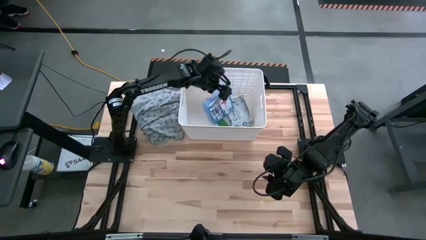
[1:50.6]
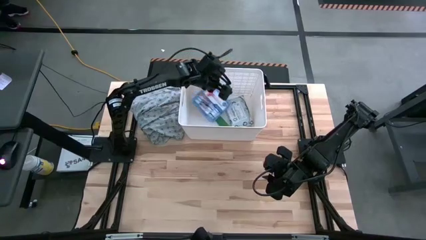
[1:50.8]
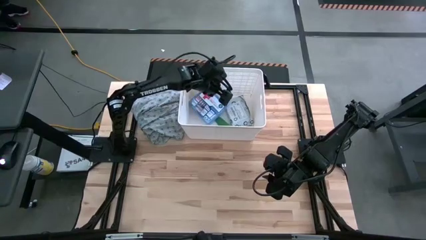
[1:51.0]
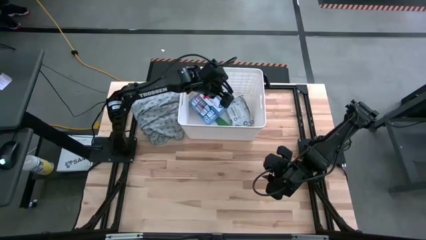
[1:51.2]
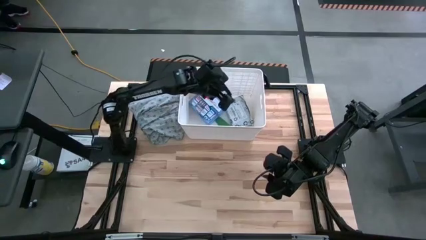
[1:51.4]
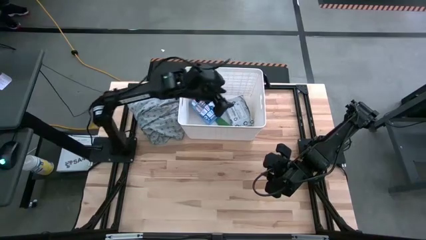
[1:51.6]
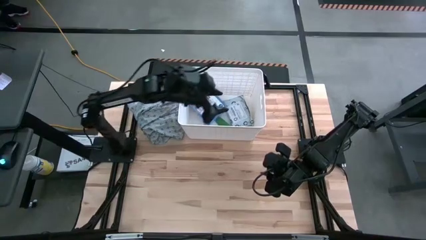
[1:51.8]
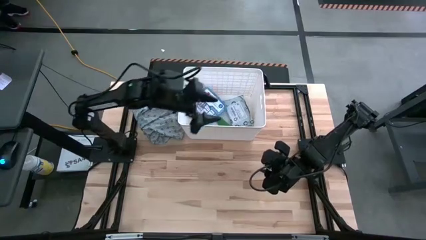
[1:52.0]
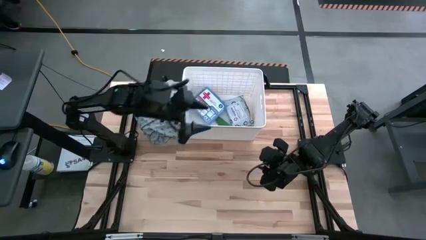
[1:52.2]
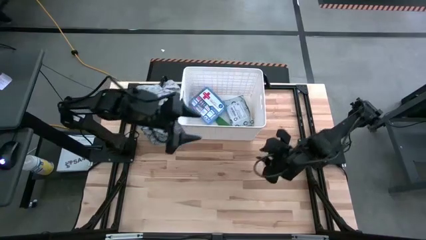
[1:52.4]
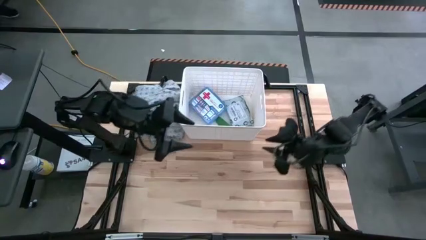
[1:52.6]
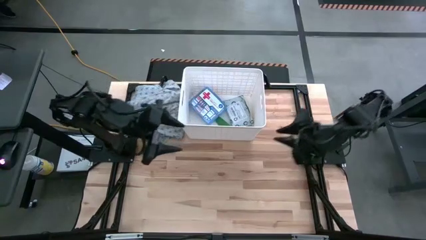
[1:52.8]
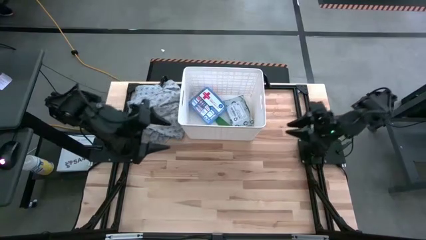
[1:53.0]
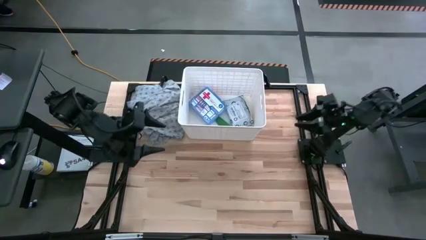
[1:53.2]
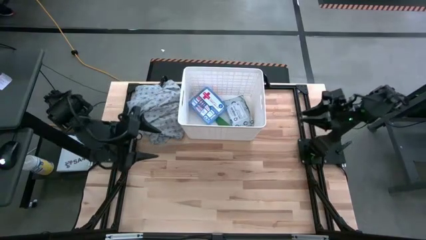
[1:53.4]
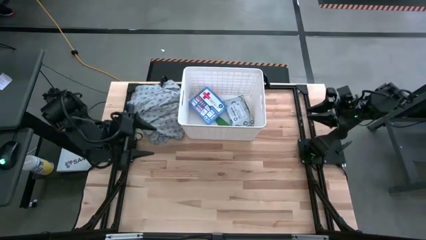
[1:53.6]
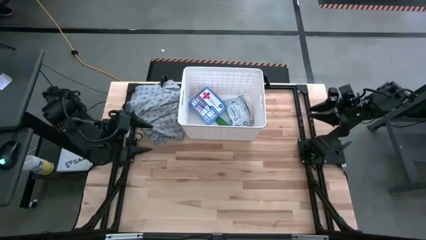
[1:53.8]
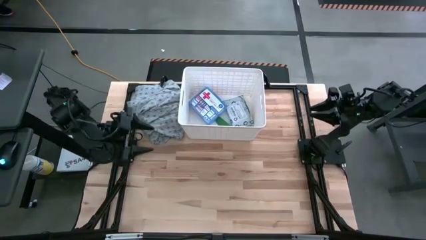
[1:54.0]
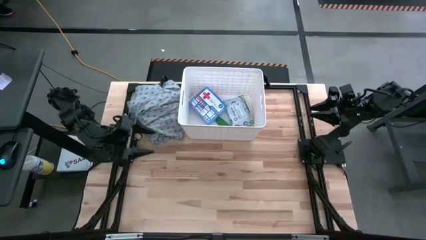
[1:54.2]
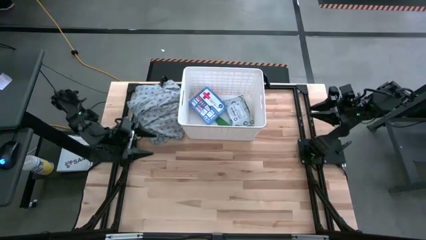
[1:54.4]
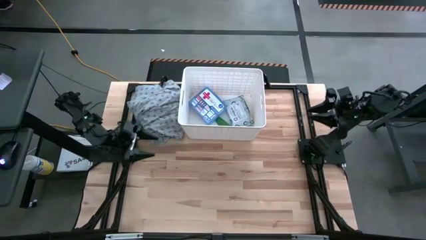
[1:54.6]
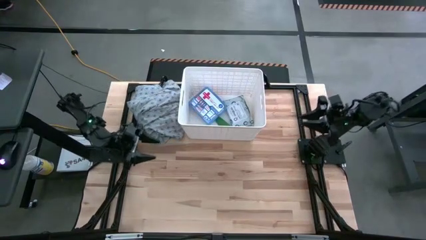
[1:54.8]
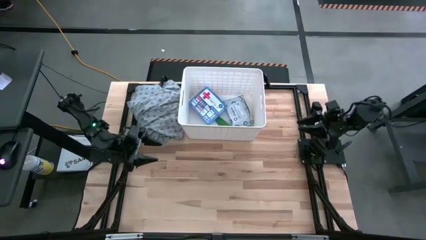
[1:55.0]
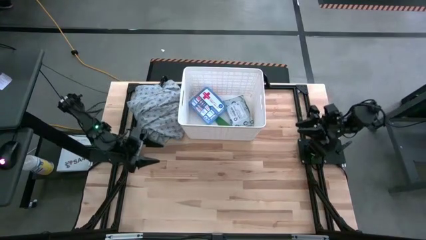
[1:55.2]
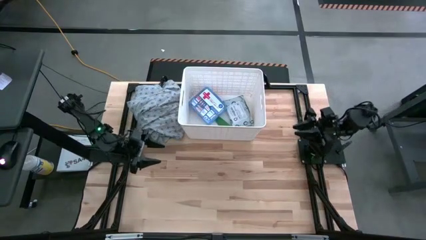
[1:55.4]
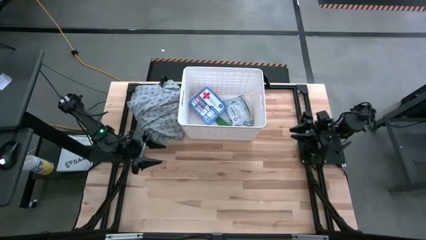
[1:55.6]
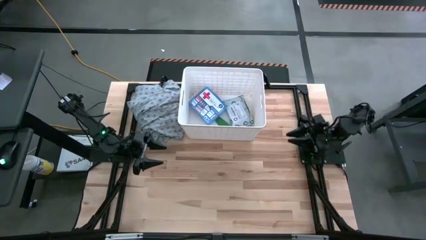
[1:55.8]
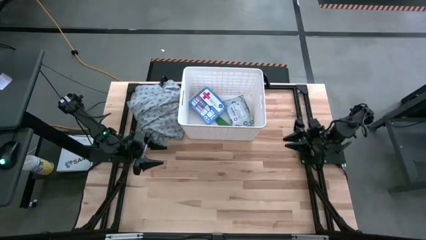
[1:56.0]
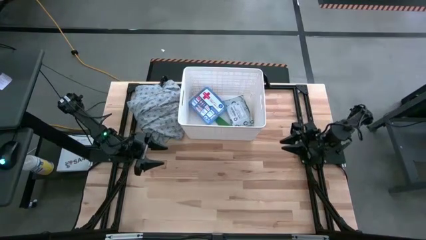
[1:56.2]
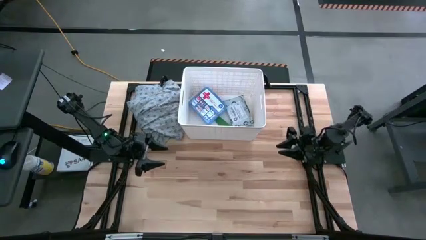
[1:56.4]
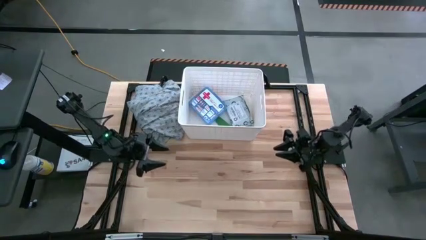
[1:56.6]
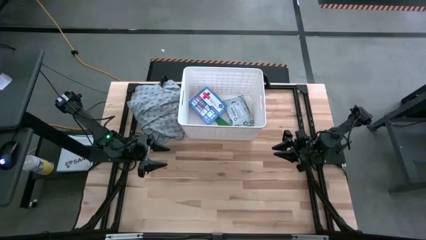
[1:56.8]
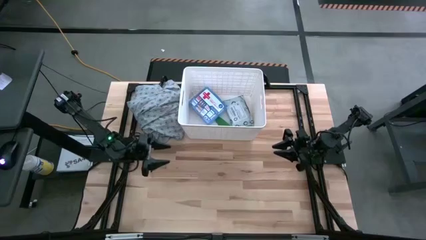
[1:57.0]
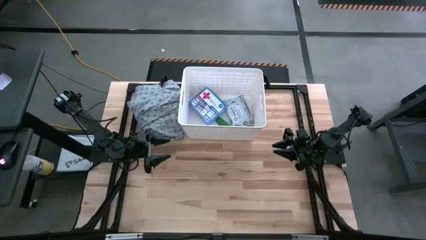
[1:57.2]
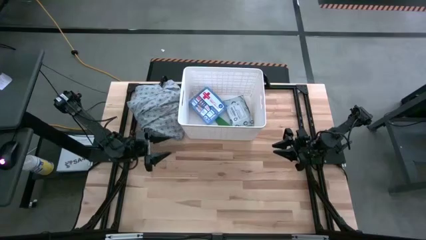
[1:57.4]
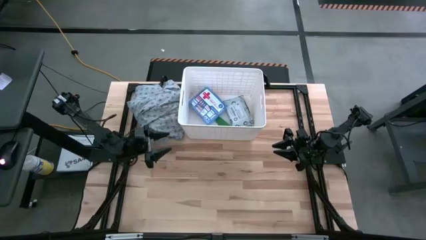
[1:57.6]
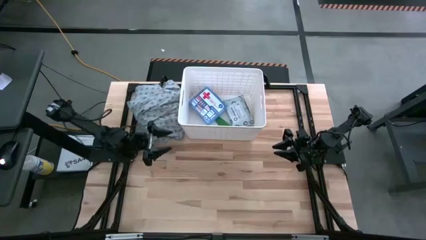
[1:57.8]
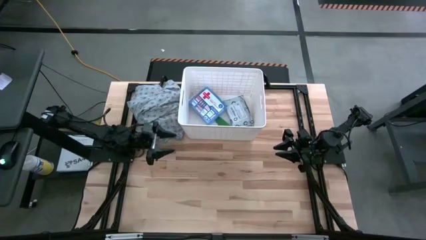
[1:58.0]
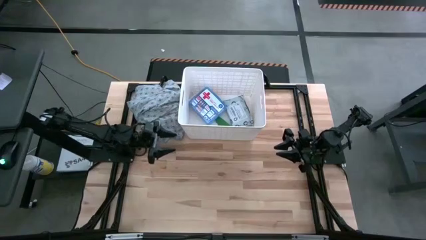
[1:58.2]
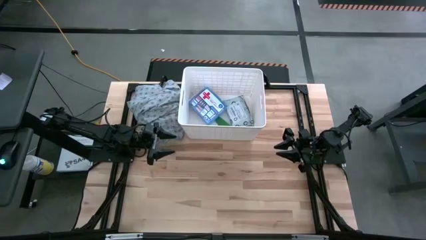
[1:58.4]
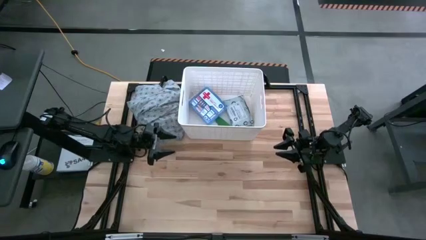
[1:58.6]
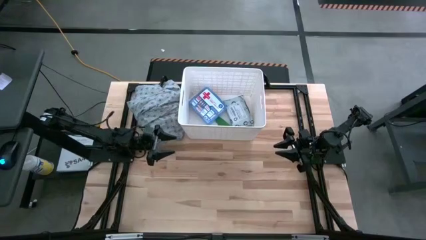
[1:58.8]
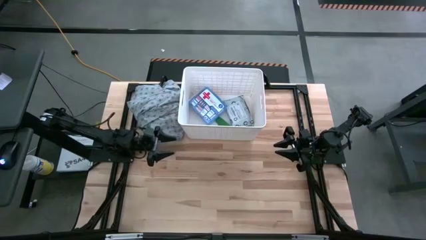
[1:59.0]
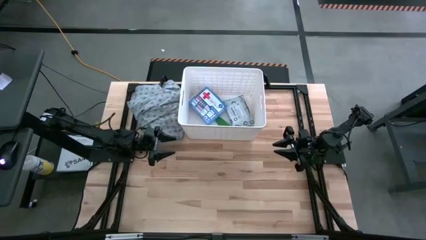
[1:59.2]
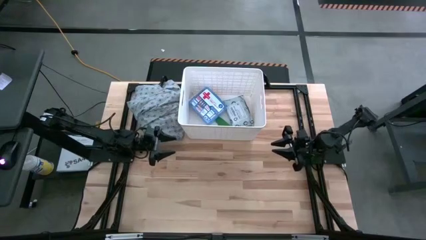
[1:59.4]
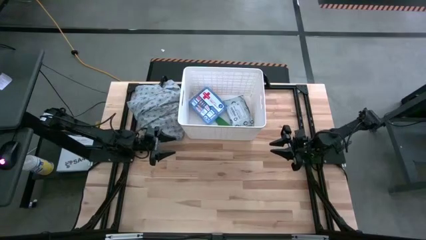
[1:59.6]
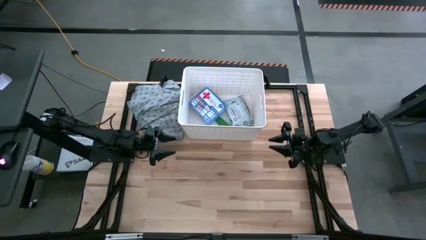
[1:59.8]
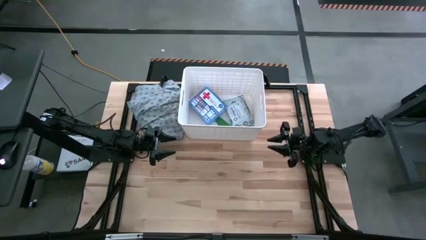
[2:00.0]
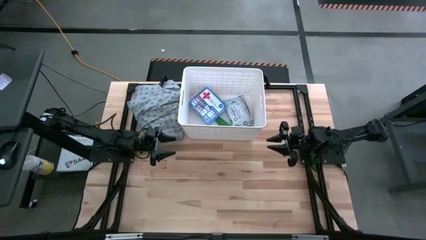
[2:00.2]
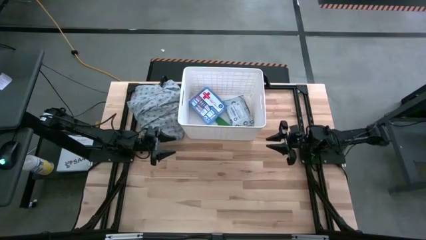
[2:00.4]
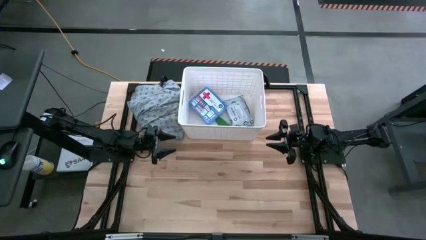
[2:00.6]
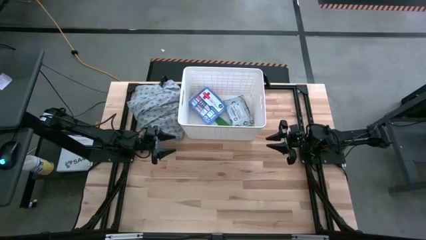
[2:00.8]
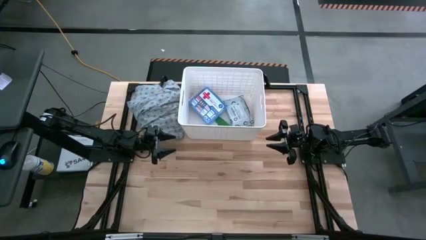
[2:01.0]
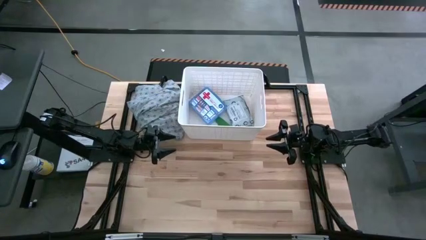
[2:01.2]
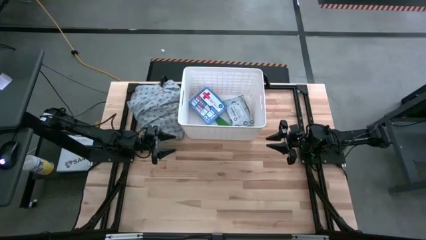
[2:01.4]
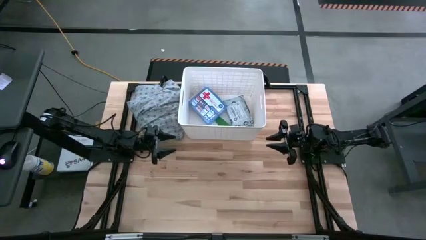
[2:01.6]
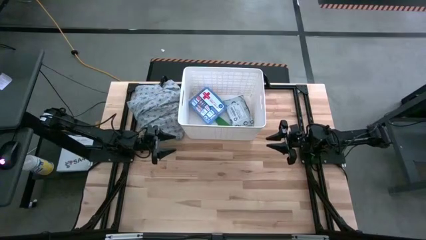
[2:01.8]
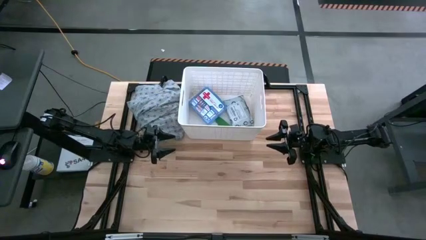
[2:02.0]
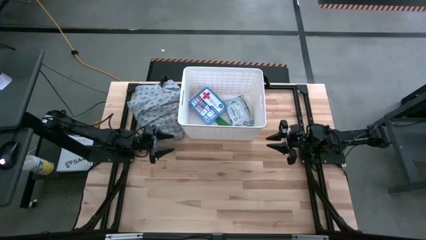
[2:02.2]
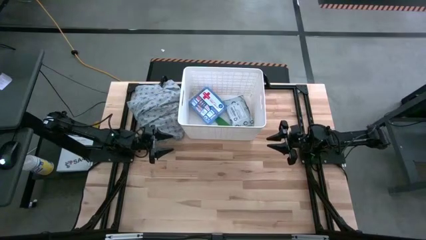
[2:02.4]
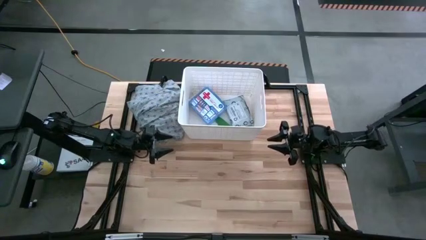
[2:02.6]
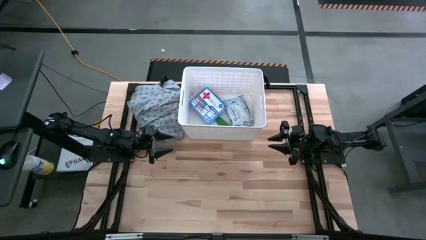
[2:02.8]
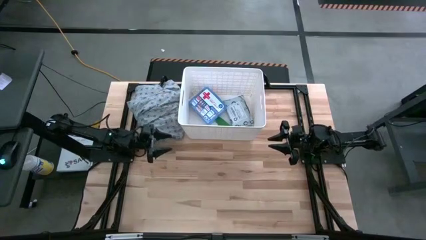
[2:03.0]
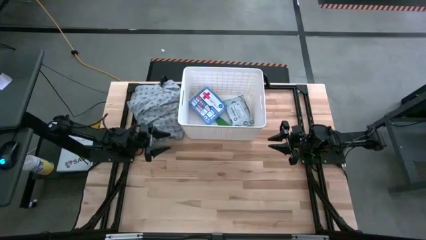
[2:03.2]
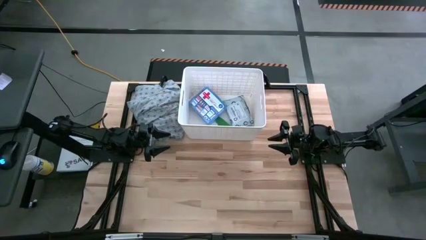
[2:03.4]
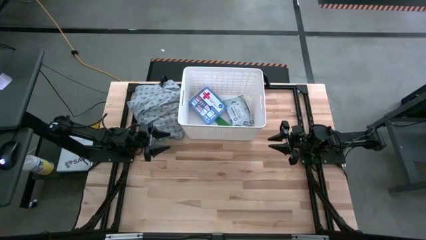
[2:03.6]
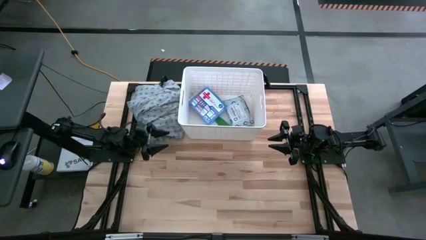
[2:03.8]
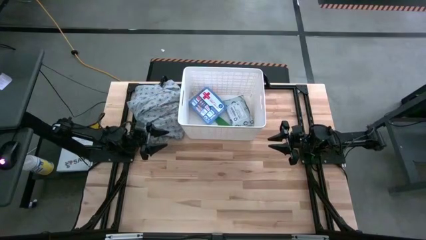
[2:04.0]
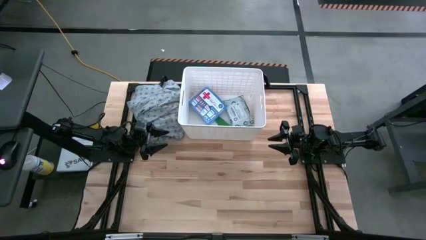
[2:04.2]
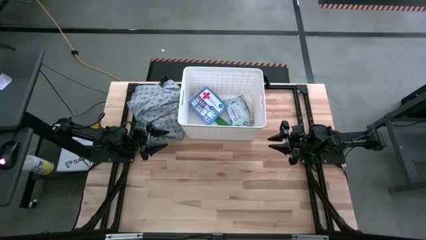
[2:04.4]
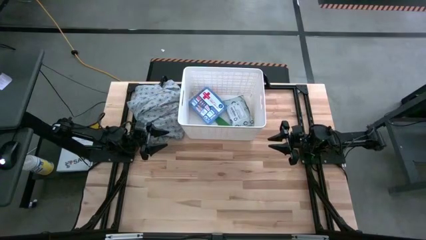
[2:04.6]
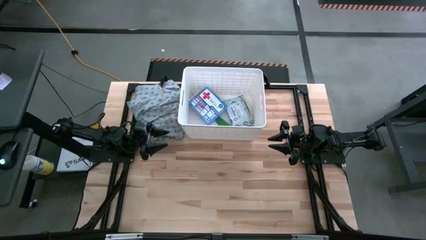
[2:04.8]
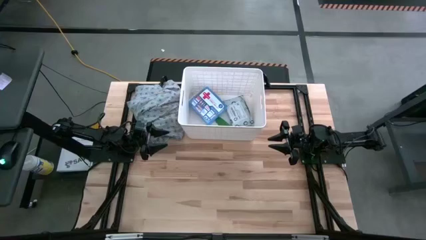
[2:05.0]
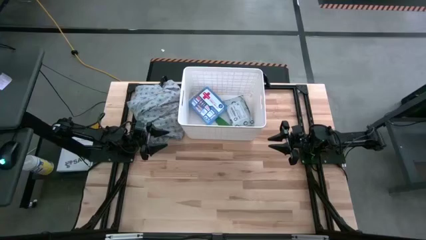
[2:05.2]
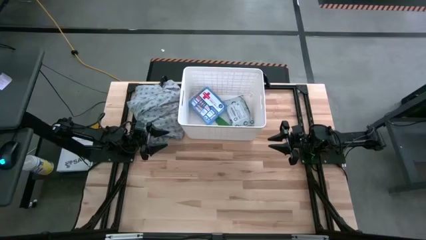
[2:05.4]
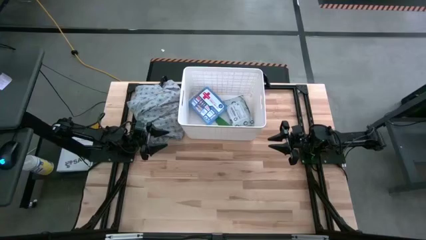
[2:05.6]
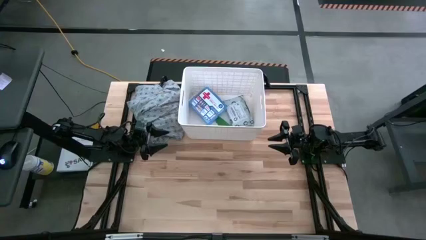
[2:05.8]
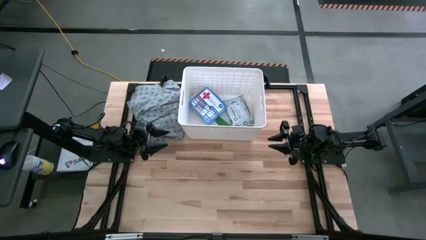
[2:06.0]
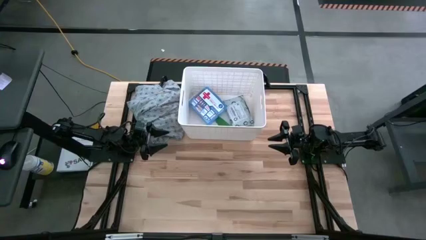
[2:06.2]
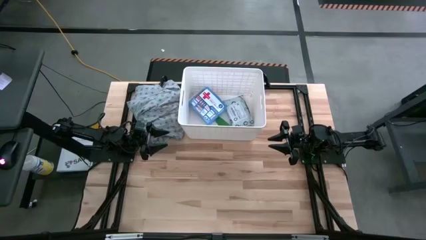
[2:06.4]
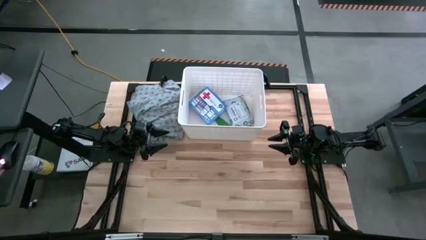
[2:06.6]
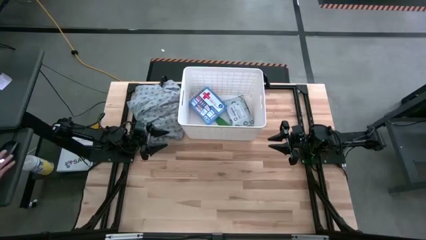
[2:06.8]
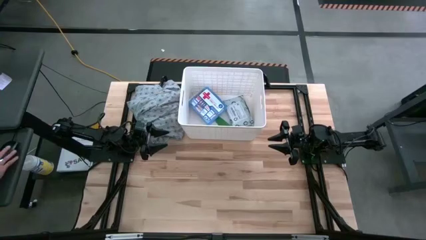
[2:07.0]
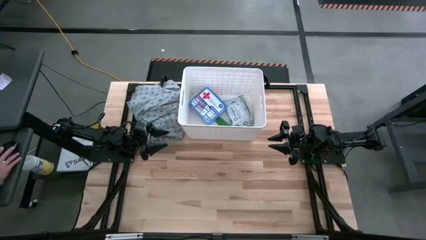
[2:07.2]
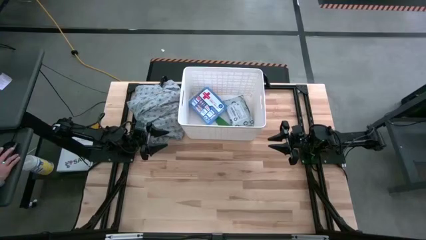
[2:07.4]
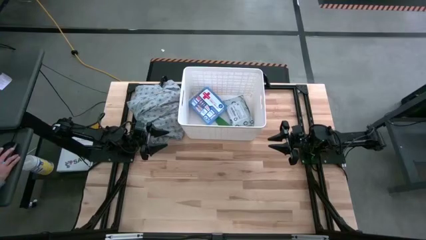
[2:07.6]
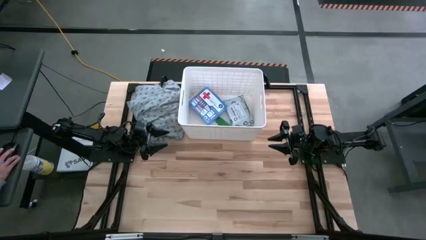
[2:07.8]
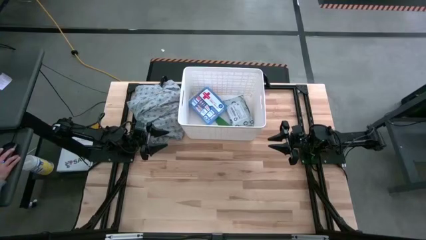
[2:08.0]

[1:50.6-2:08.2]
Task: Pick & place medical supplies in basket/bin
Return to Home Position
